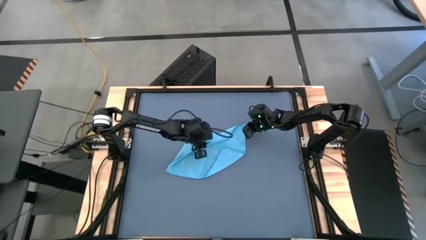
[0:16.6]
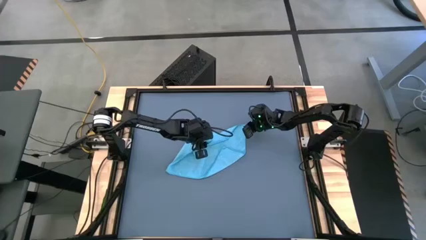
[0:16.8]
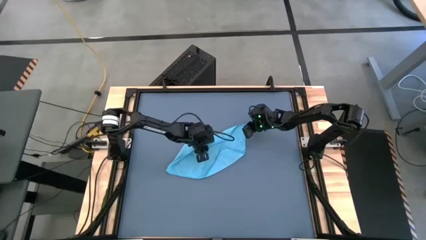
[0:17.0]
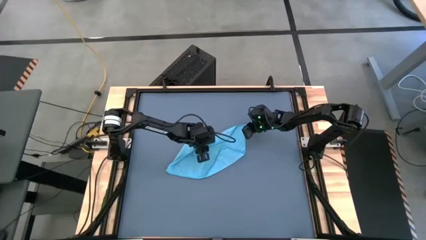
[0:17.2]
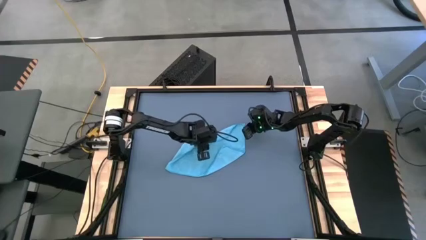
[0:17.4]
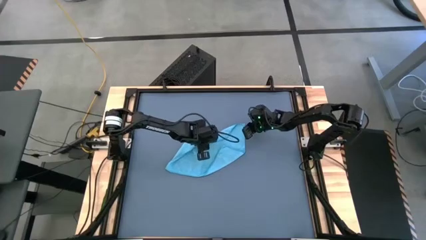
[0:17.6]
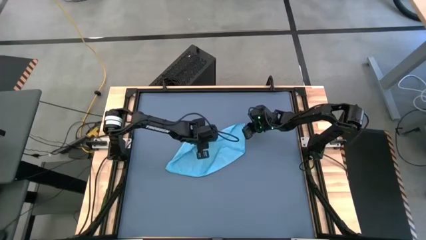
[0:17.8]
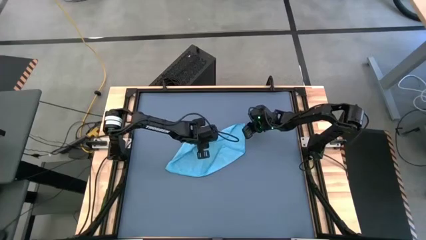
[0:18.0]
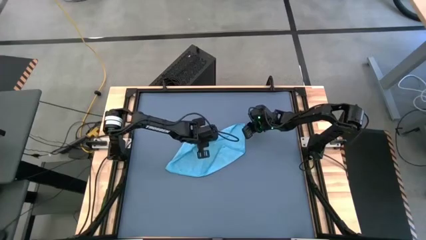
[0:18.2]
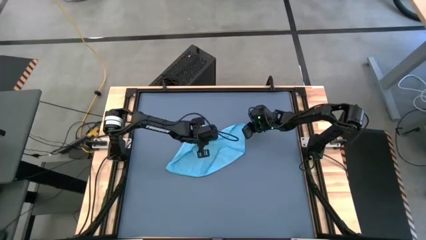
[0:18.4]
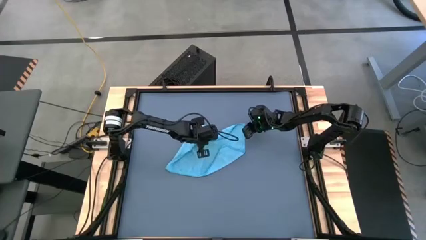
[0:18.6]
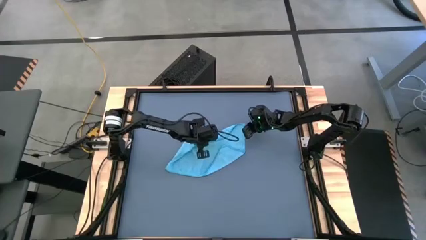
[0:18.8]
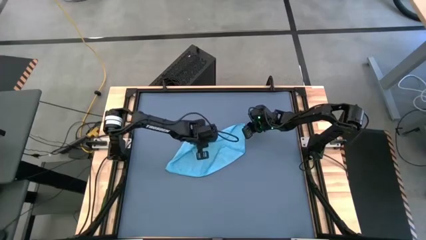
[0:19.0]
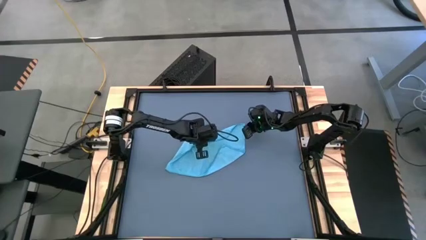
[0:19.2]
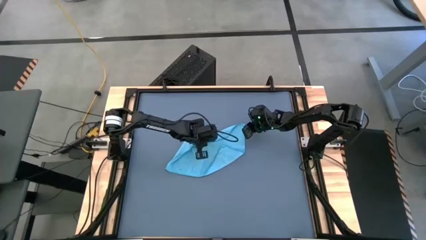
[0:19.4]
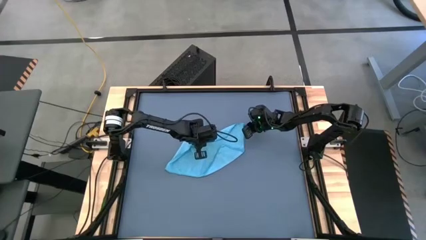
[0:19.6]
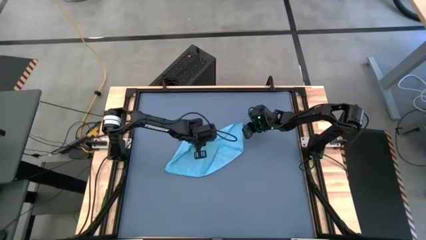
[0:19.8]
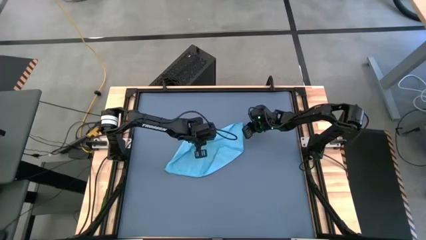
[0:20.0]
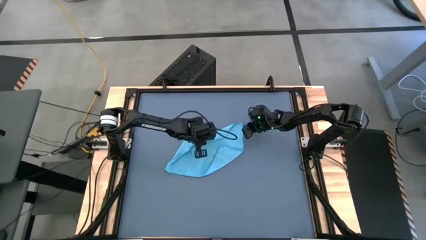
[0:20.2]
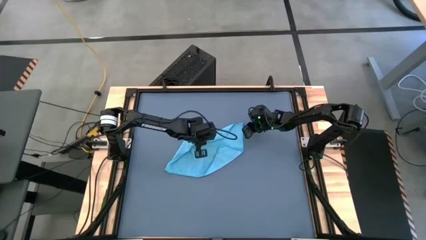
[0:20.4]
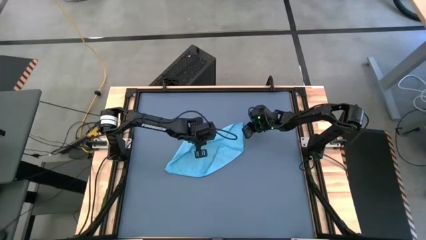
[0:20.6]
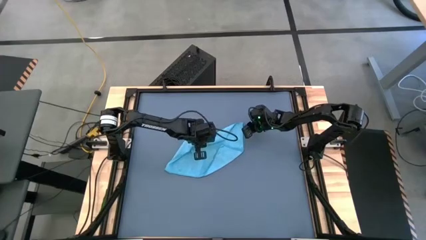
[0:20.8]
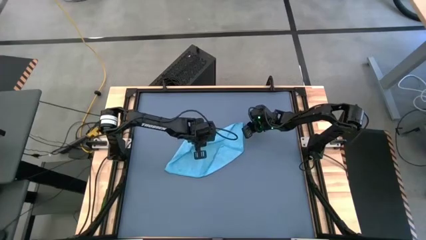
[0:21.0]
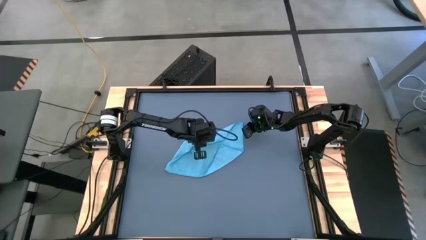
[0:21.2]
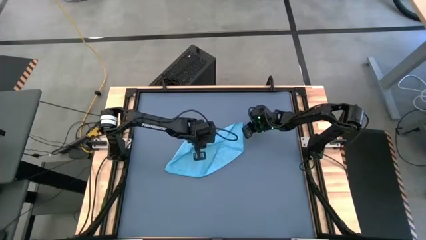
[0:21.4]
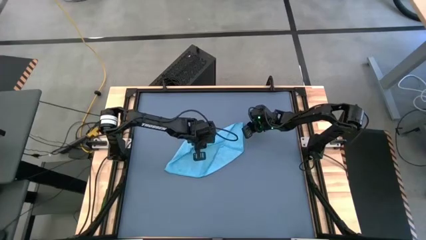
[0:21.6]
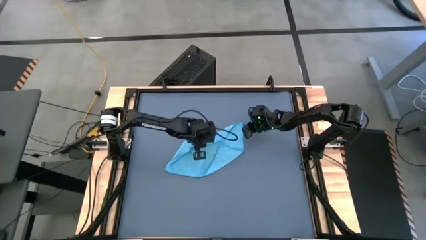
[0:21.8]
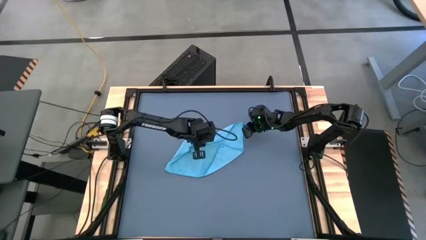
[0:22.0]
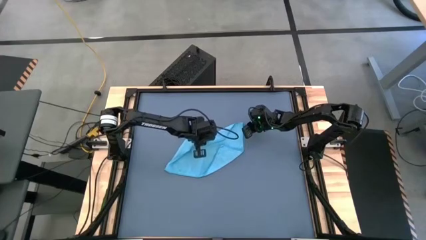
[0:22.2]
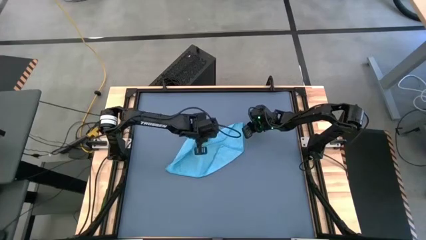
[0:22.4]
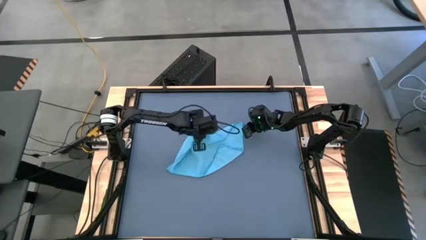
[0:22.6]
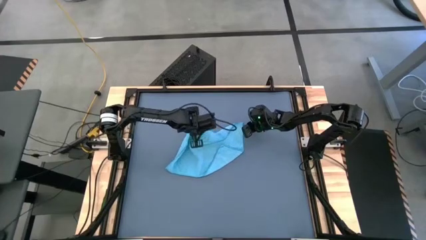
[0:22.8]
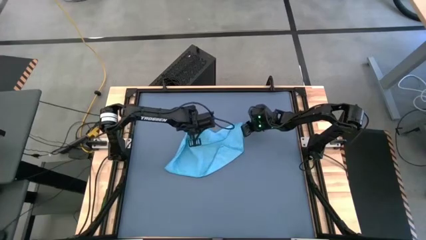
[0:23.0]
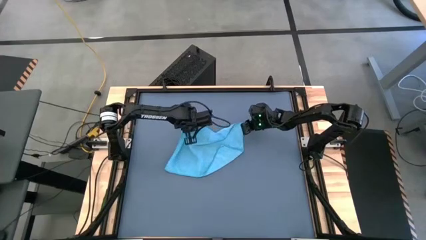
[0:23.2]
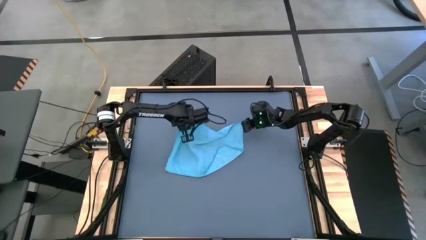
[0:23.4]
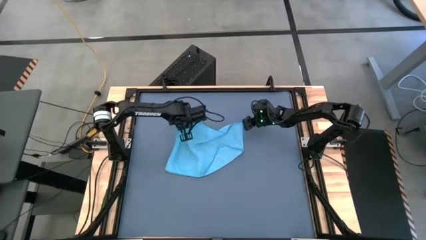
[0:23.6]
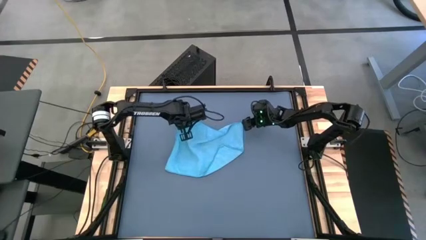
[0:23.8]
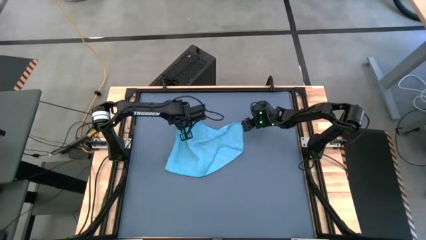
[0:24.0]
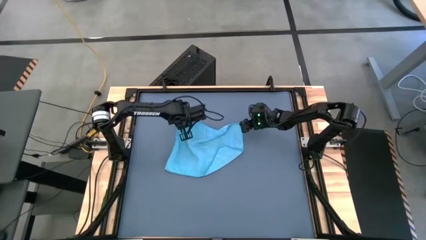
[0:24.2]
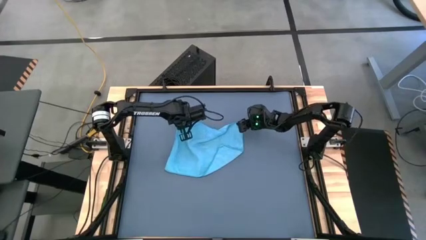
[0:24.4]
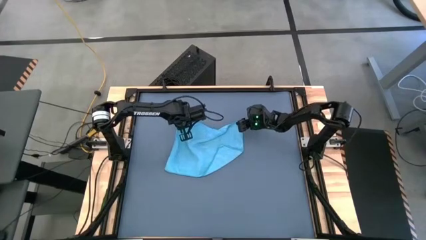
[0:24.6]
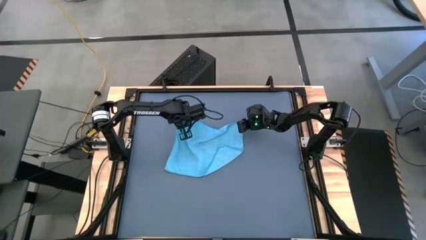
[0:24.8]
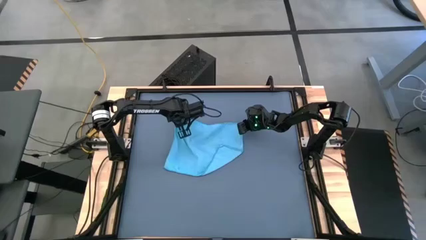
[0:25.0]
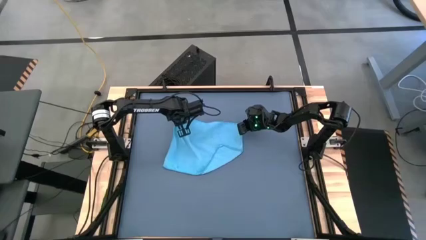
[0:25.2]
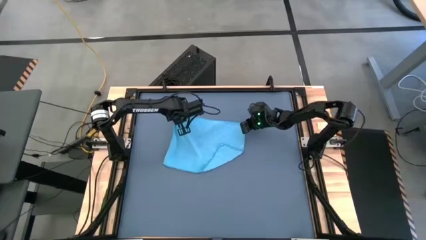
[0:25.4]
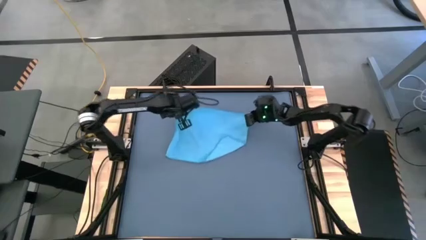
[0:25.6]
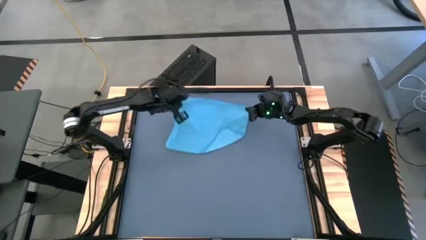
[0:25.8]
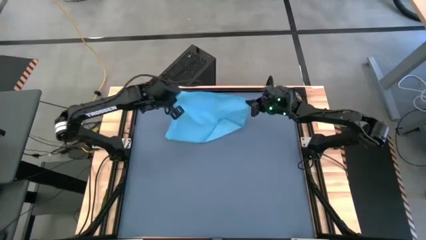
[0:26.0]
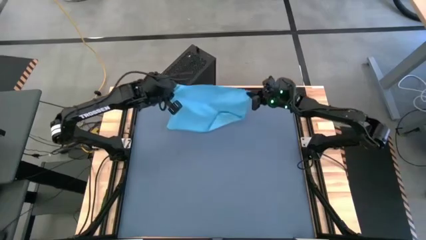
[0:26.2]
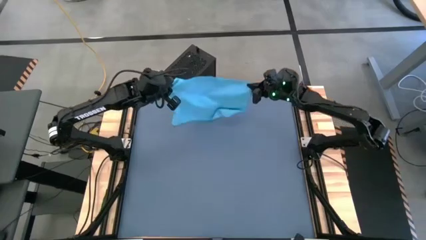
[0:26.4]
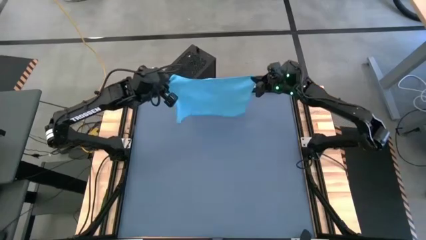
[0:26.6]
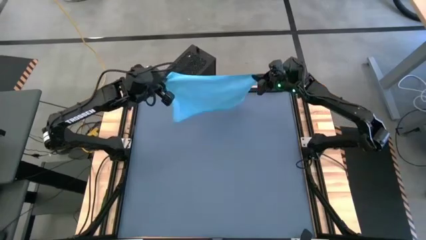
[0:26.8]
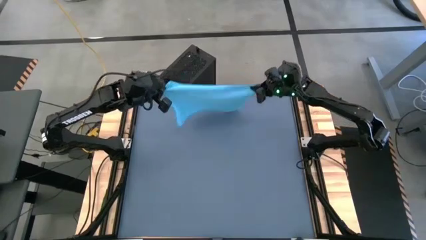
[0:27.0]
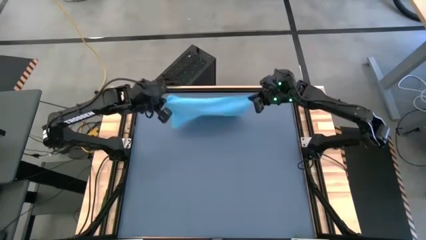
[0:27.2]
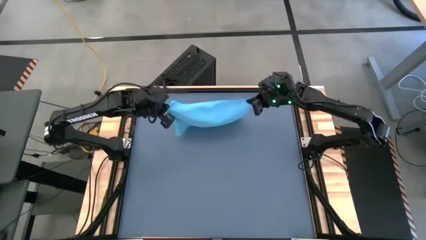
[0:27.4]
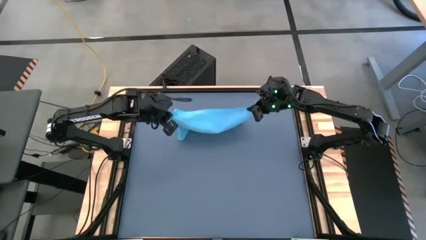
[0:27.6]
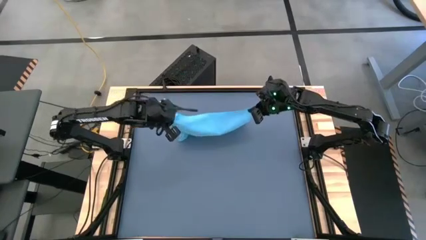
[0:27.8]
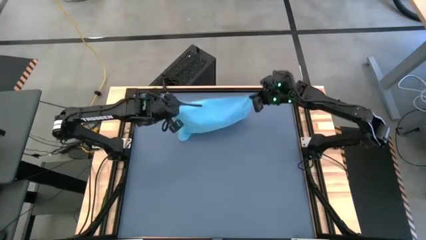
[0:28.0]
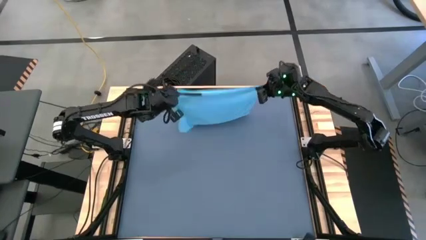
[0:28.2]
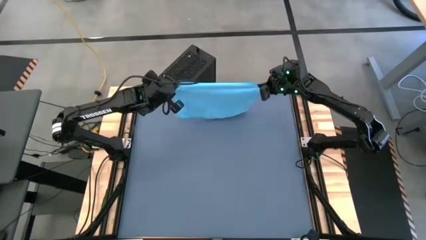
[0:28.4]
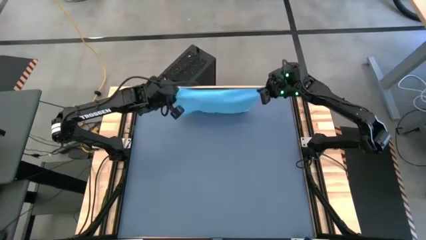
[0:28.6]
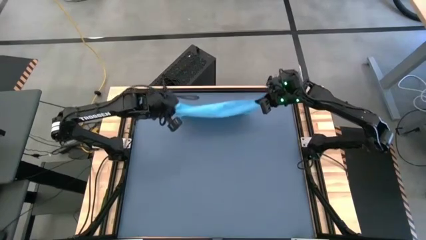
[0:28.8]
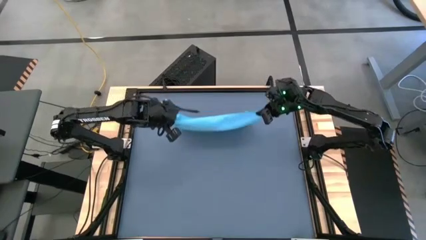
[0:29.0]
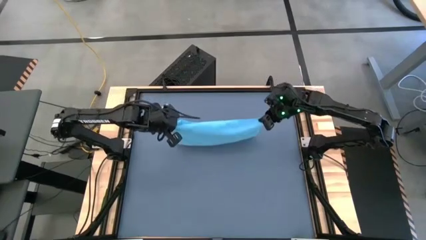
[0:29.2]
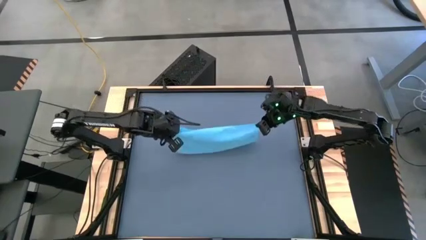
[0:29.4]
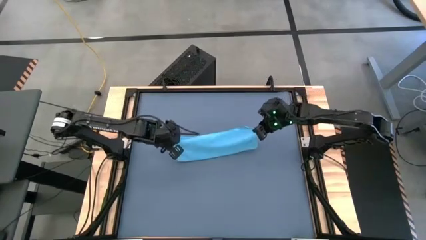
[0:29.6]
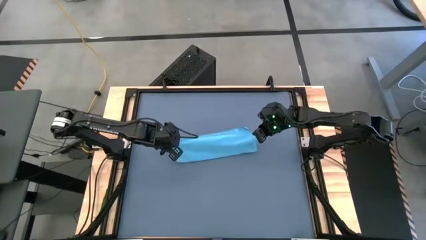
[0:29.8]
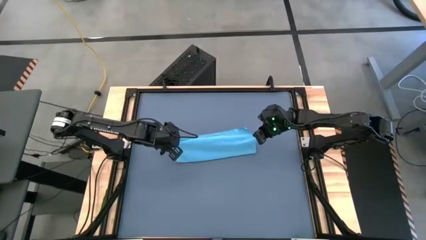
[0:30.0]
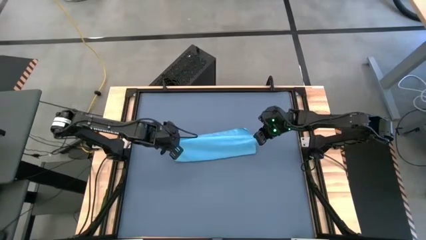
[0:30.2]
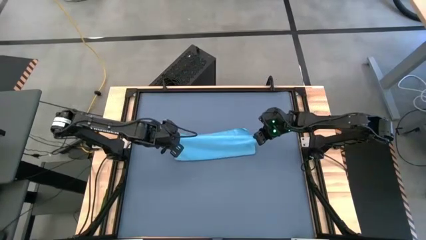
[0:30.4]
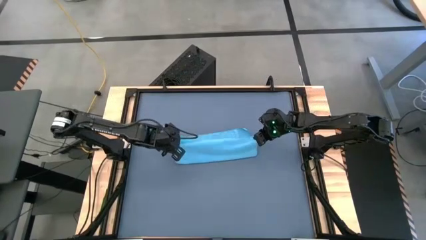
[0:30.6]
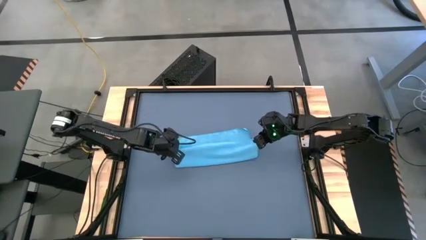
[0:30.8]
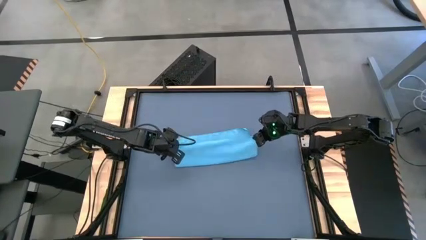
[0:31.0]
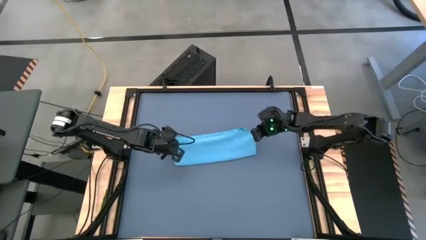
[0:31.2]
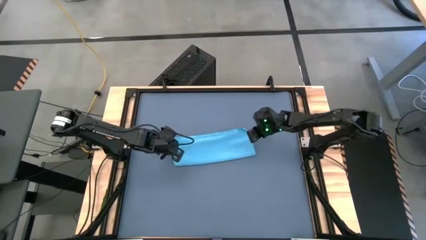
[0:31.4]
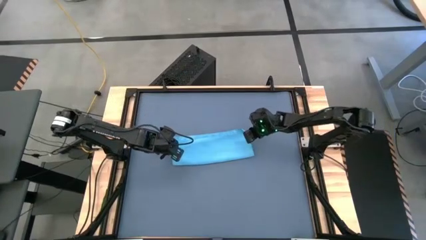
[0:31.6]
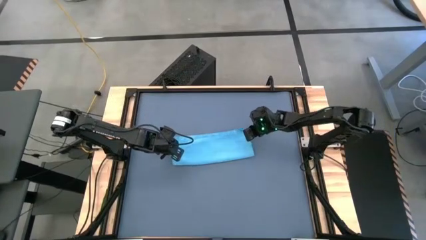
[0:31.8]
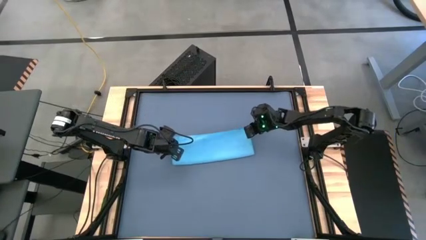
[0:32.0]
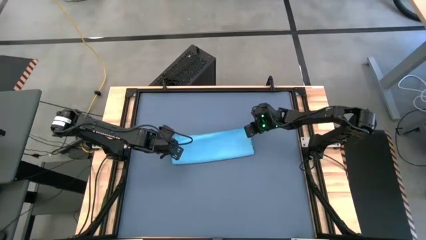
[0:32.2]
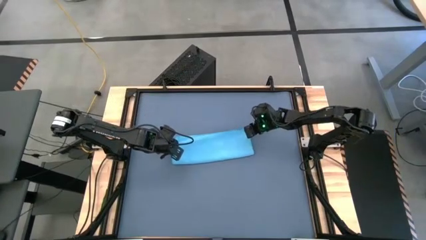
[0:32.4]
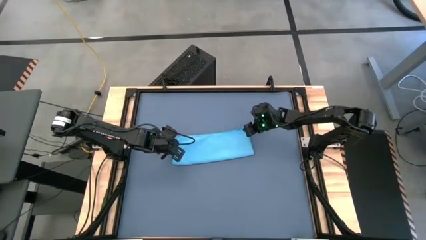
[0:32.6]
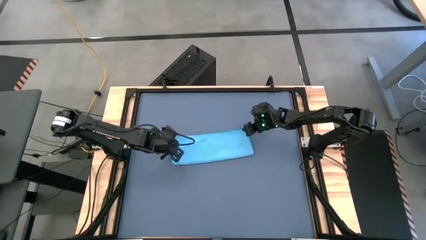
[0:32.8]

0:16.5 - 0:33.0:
Task: Roll towel
Fold the blue microfiber towel
